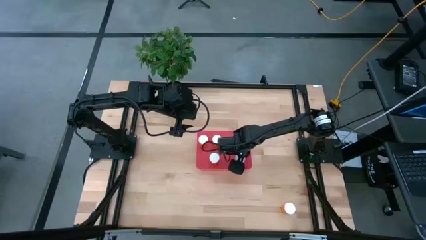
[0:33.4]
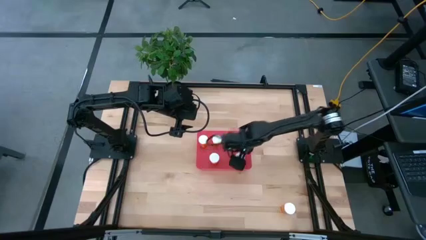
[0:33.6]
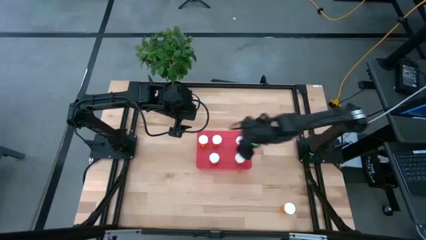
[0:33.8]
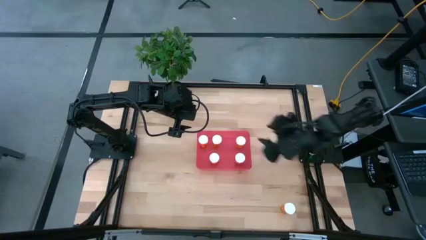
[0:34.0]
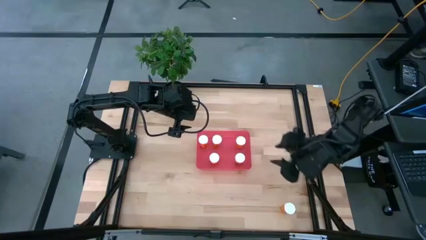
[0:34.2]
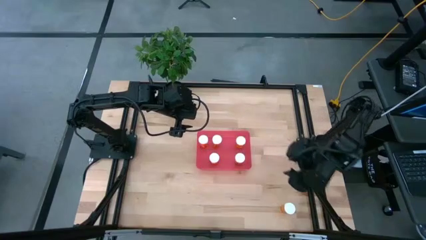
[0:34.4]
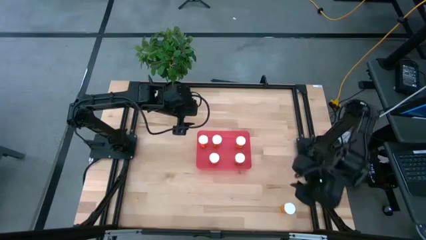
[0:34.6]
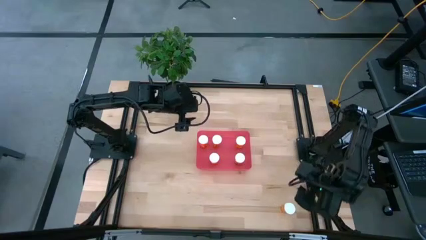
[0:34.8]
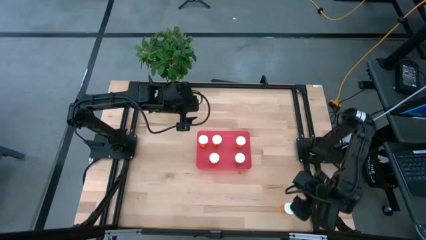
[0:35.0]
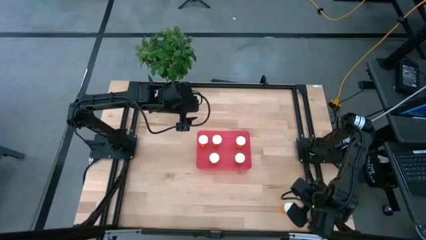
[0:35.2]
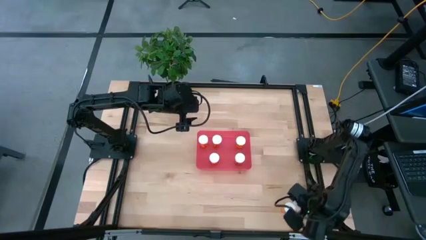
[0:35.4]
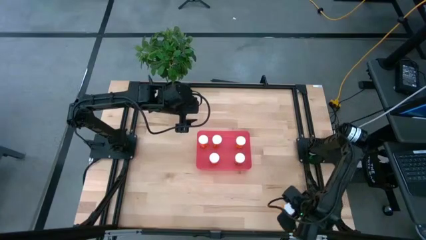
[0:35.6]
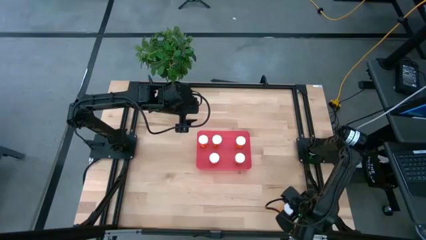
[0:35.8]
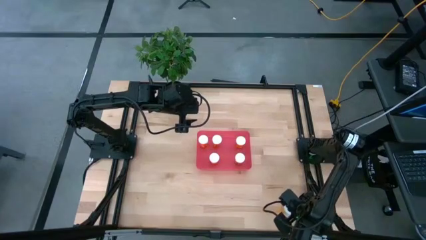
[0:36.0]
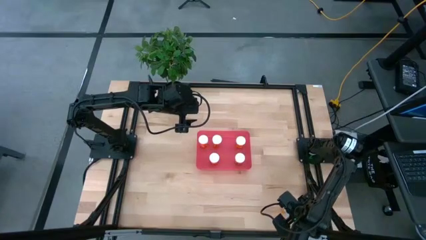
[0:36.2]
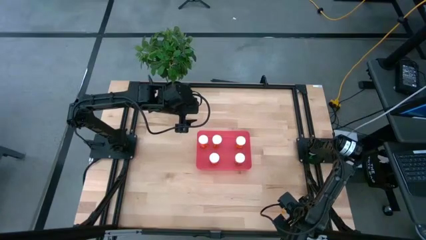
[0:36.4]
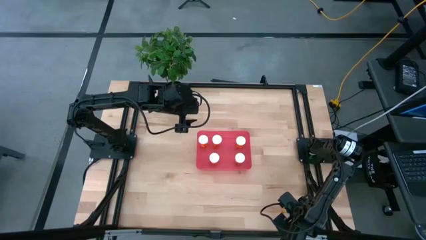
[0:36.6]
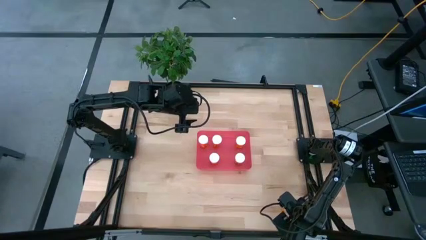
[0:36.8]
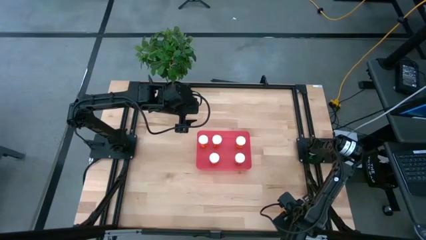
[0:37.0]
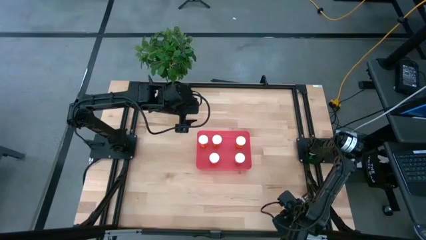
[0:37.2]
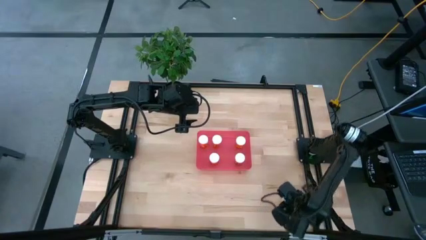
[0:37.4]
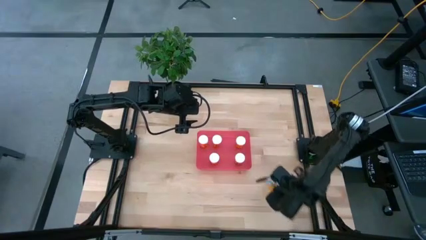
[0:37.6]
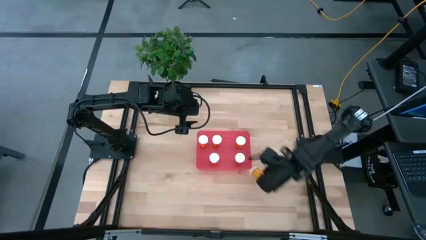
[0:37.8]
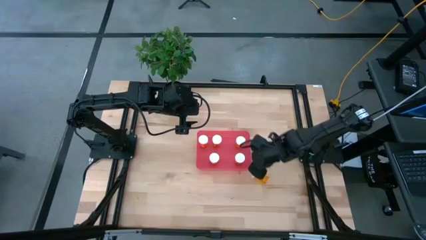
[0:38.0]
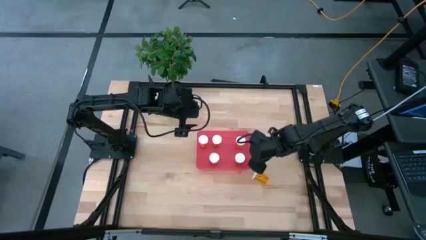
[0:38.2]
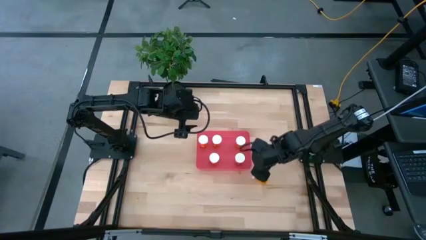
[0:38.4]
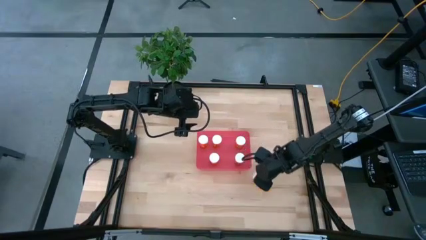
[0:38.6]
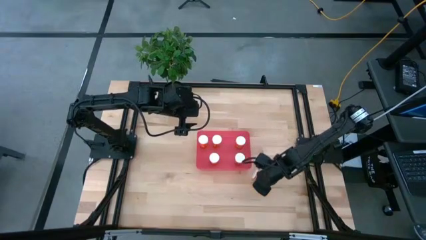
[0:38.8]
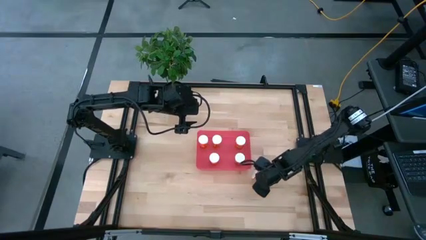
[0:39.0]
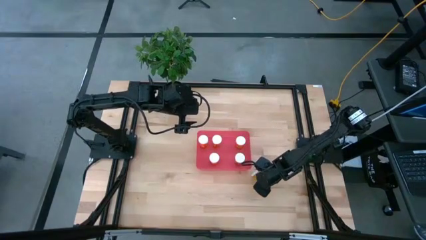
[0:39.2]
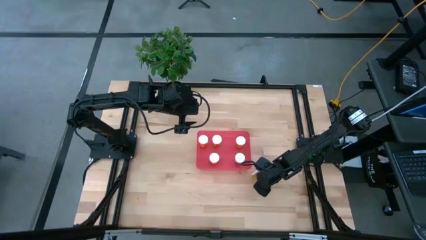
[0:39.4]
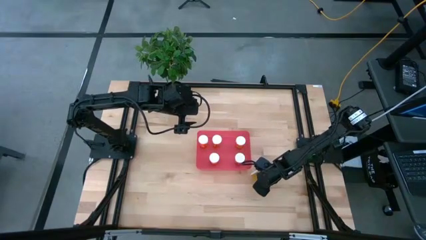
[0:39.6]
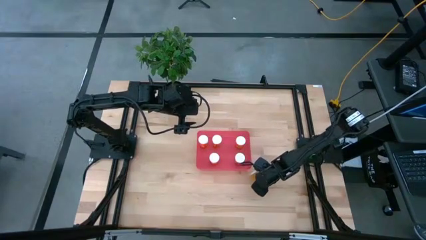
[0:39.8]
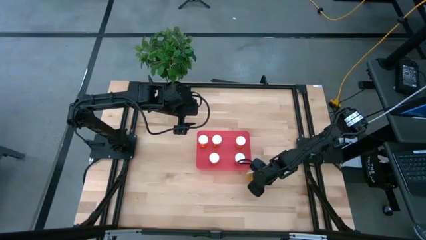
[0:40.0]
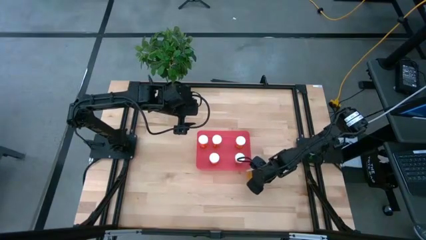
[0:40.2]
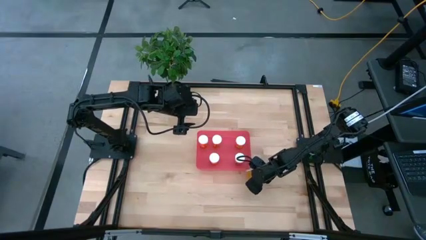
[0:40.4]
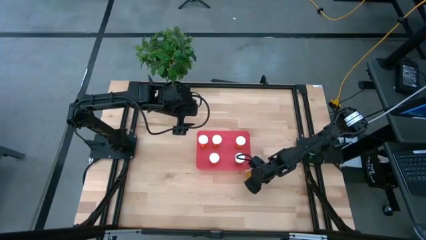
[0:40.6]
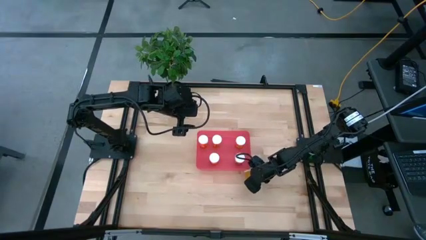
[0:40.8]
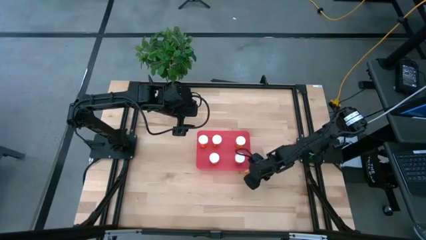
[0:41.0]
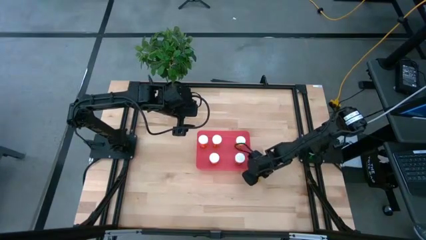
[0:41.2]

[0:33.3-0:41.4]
Task: Pick and place pill bottles into a basket
Put the orange pill bottle into the red bin

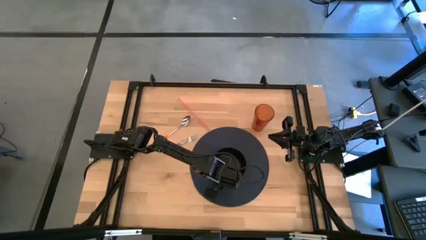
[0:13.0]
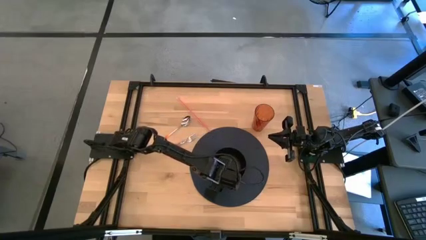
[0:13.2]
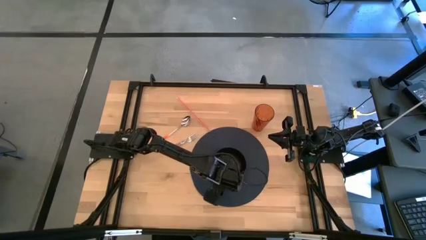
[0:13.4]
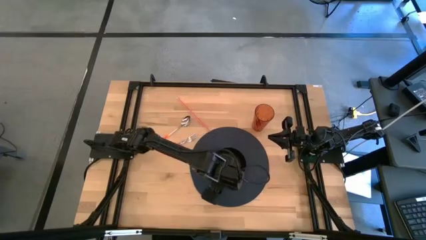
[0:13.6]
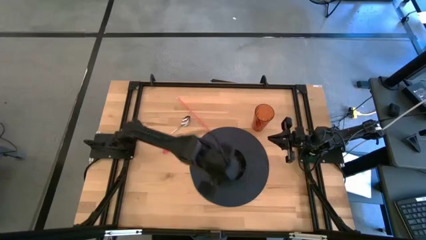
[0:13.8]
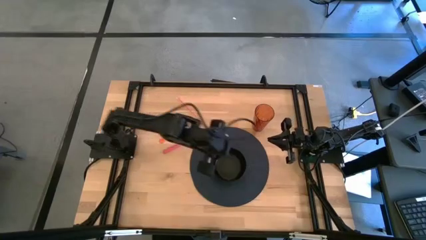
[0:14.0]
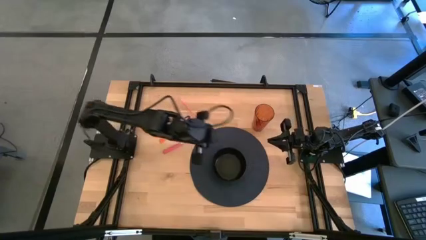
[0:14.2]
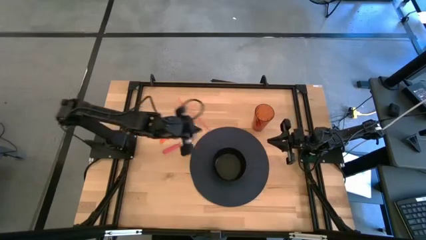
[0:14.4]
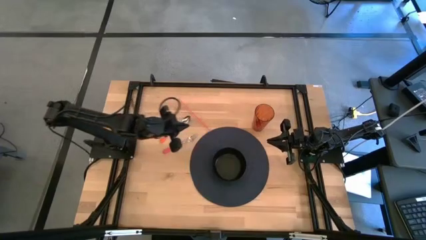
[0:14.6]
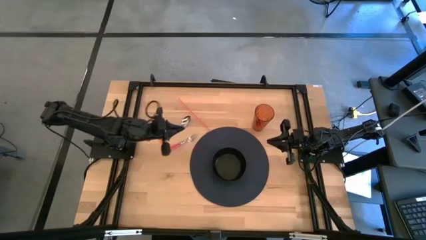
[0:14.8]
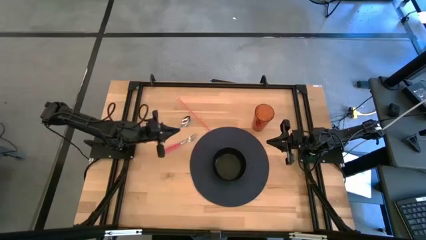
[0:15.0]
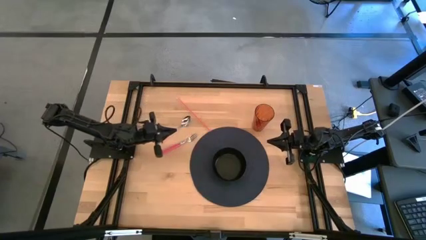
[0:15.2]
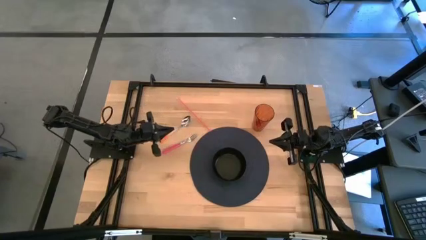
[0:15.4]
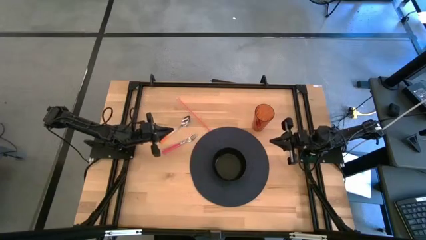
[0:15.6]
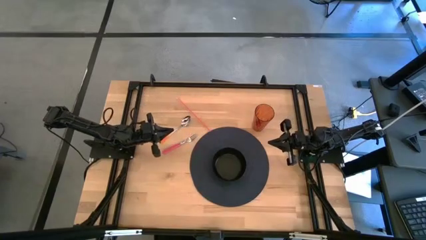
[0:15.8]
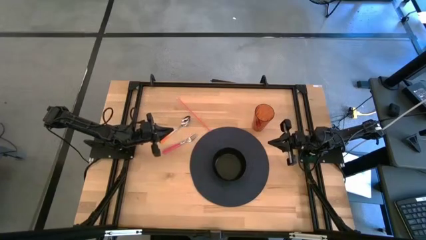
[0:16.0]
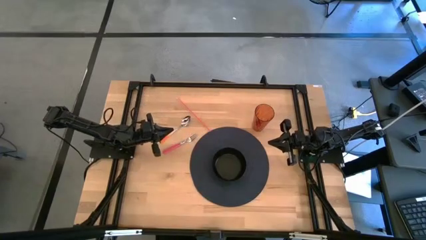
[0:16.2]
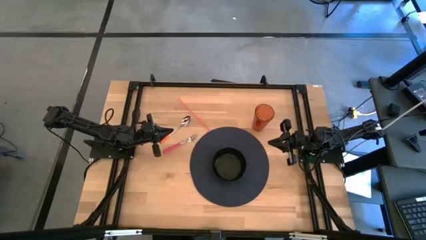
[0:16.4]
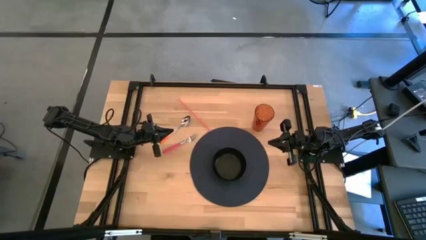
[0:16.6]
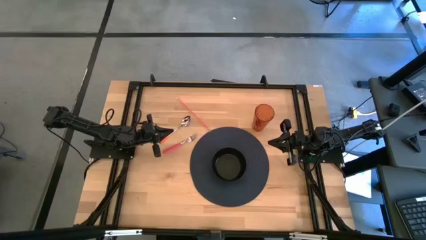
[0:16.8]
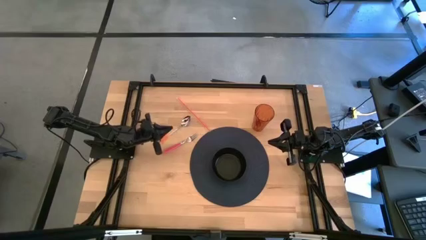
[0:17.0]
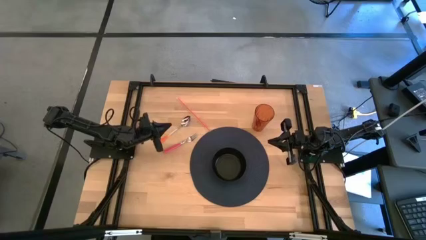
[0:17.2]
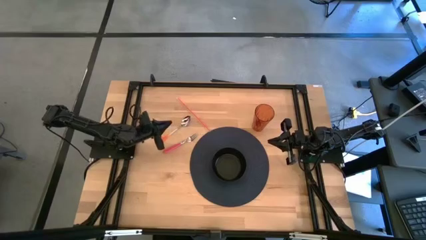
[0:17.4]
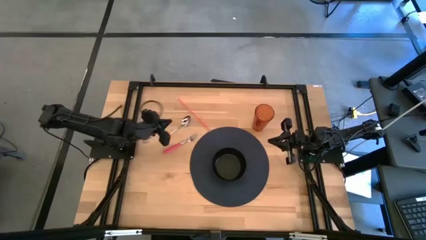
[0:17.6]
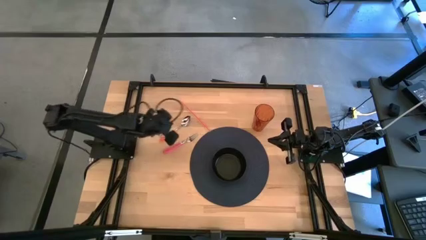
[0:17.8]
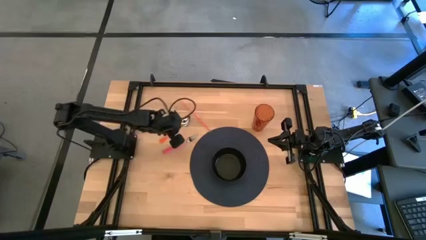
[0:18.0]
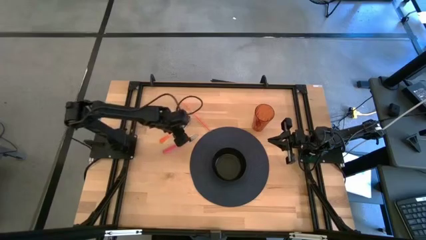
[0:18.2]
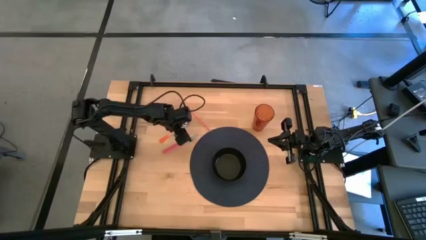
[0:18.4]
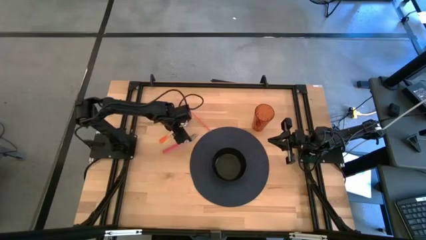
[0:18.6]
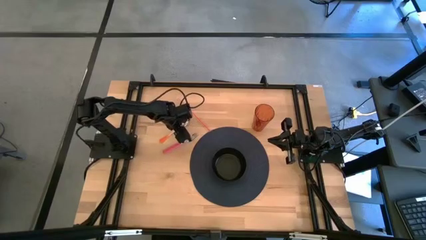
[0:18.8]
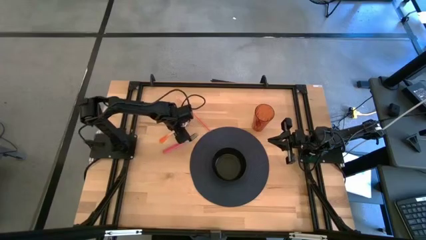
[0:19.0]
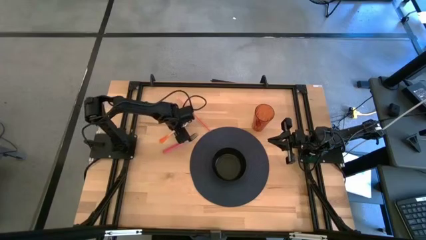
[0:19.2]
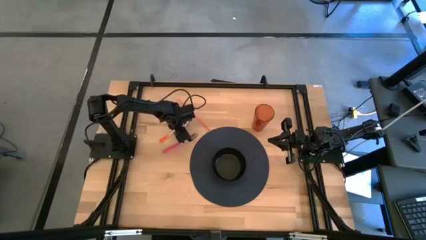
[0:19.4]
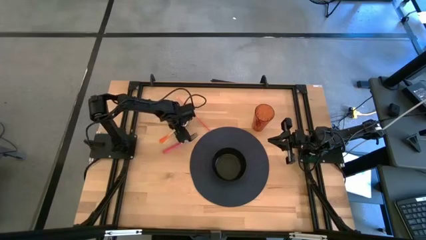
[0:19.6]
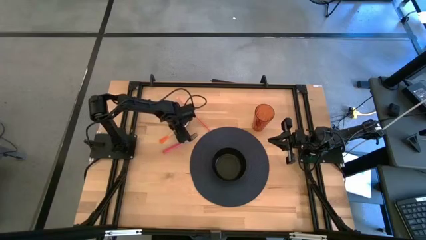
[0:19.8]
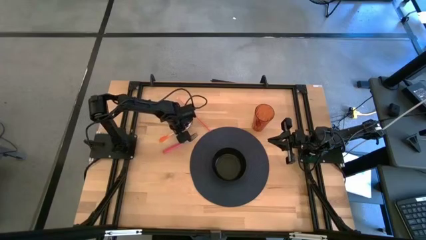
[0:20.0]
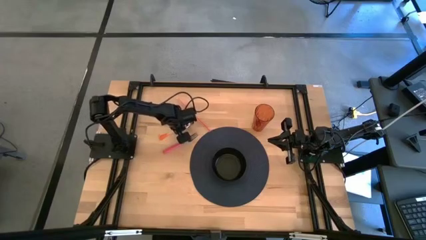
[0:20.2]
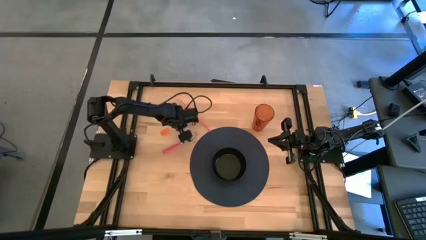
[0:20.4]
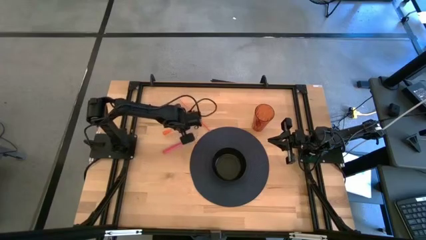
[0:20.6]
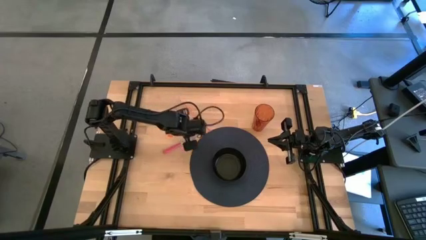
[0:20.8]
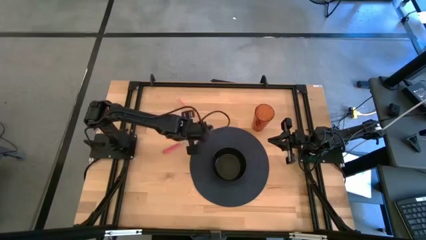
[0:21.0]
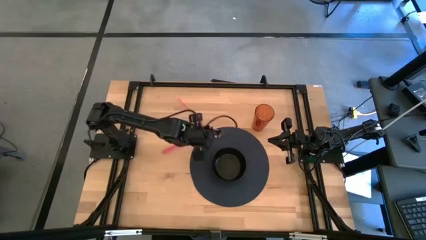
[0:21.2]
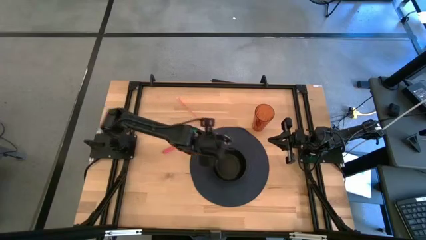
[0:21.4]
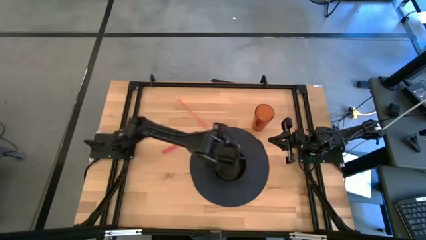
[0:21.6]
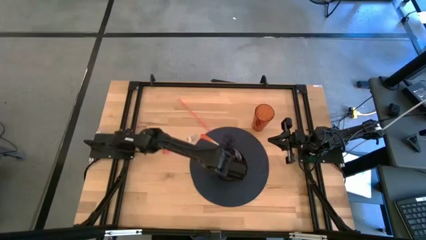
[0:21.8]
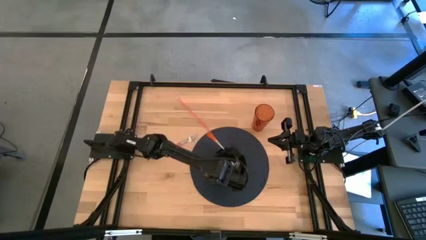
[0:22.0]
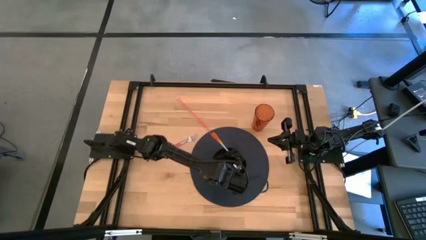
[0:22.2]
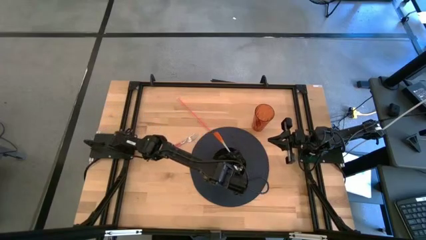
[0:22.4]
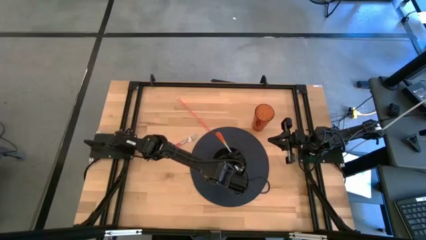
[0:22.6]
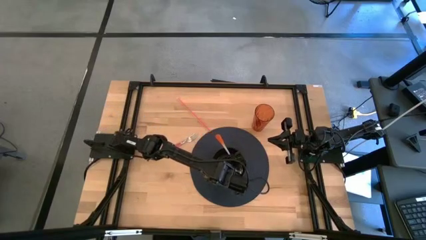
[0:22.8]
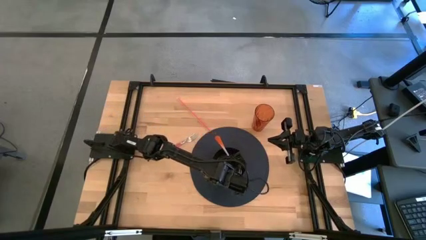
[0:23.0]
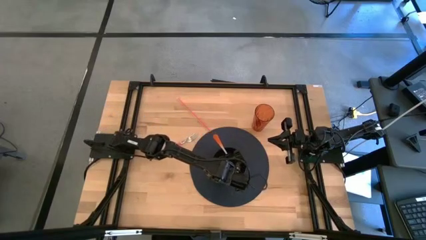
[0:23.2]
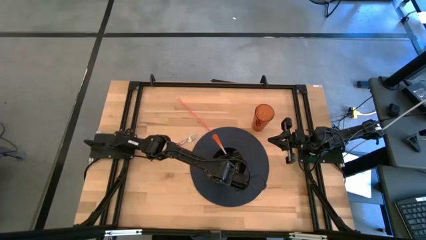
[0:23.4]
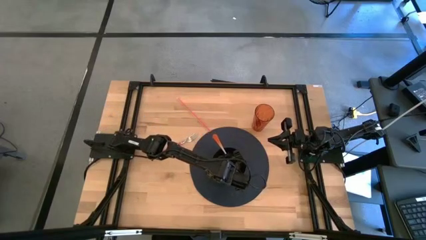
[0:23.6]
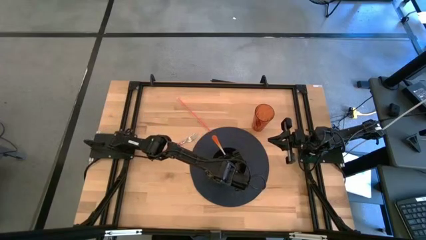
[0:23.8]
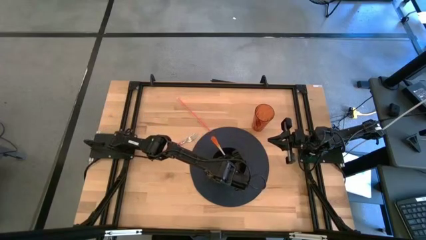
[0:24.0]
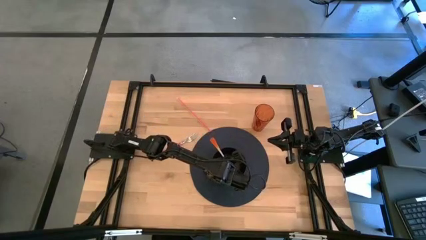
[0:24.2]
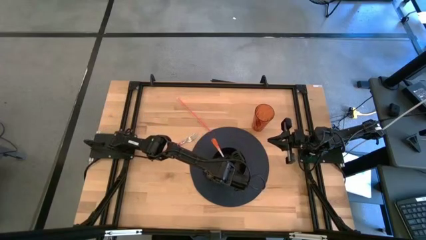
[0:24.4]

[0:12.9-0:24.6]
Task: Pick & Place Utensil
Put the orange spoon into the black bowl on the black mat
